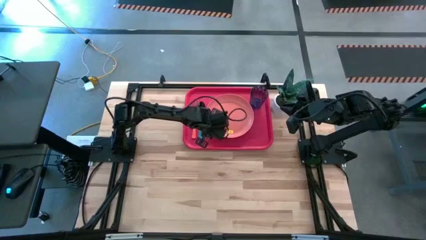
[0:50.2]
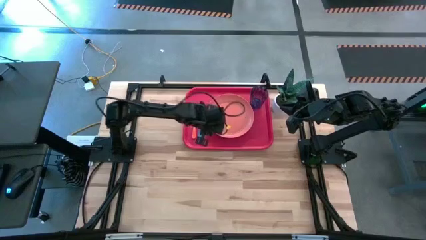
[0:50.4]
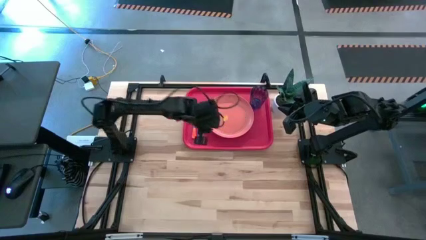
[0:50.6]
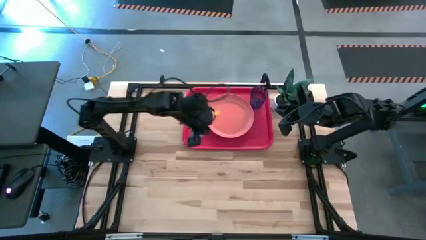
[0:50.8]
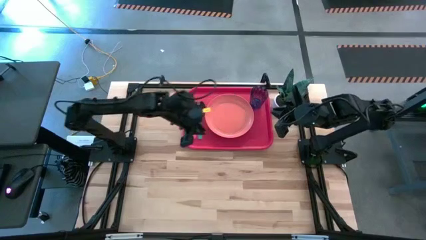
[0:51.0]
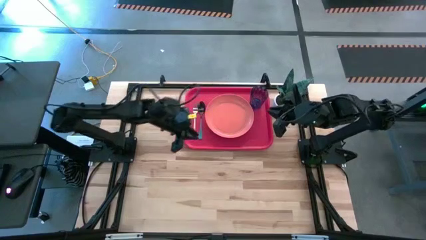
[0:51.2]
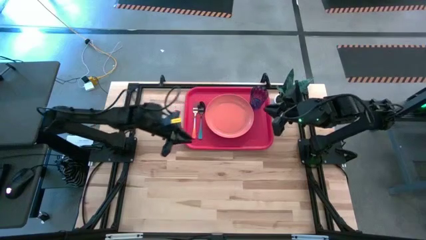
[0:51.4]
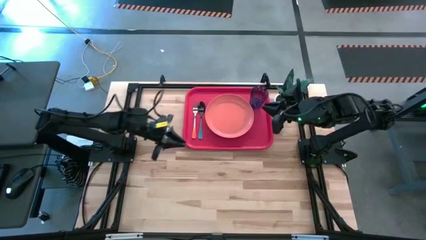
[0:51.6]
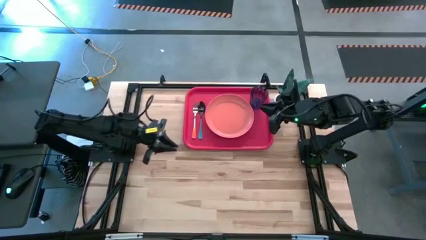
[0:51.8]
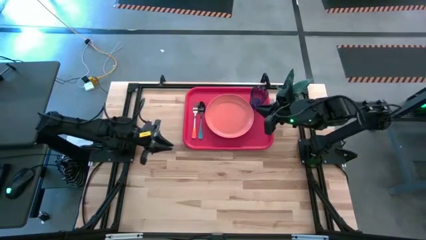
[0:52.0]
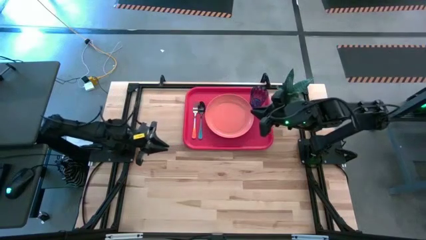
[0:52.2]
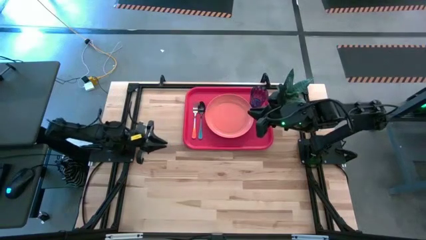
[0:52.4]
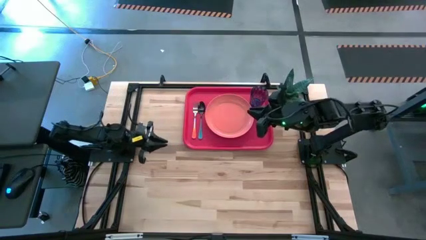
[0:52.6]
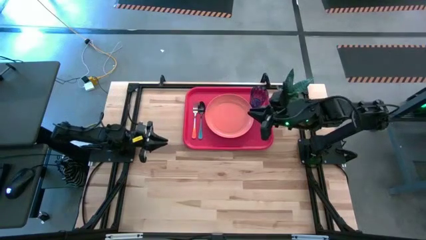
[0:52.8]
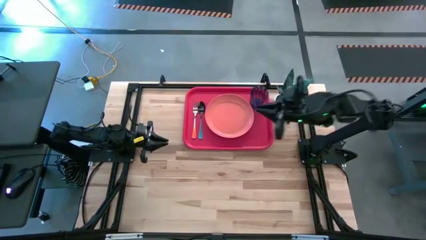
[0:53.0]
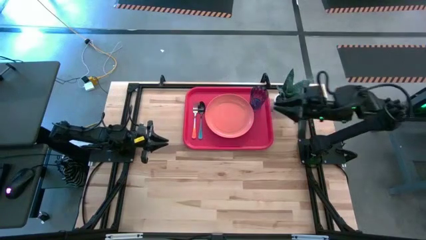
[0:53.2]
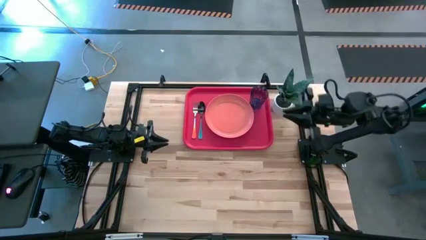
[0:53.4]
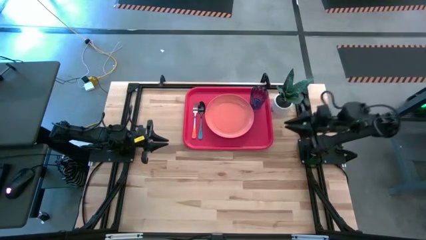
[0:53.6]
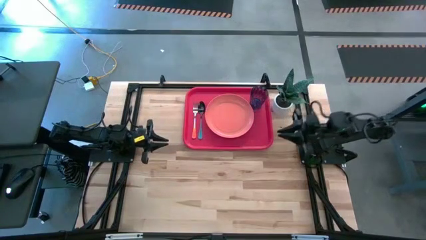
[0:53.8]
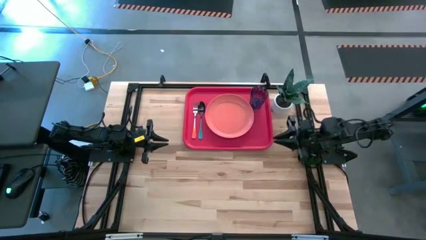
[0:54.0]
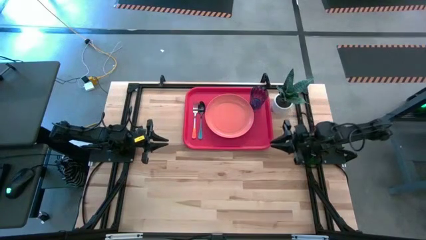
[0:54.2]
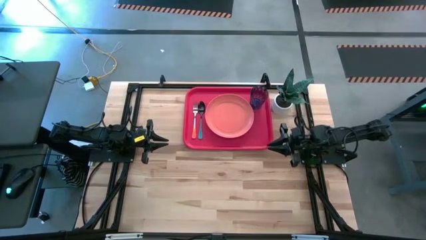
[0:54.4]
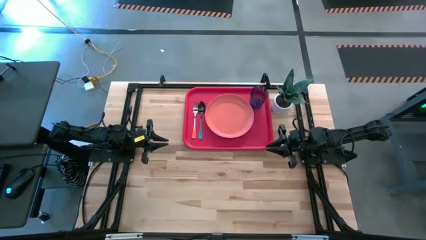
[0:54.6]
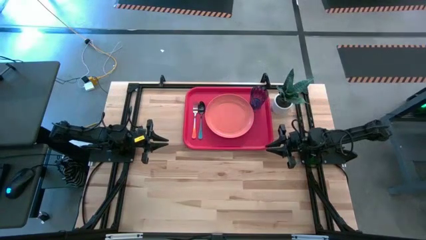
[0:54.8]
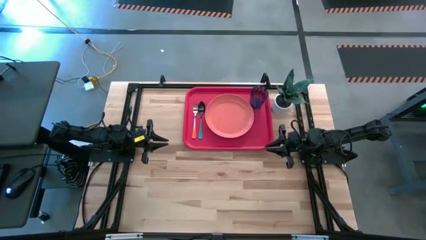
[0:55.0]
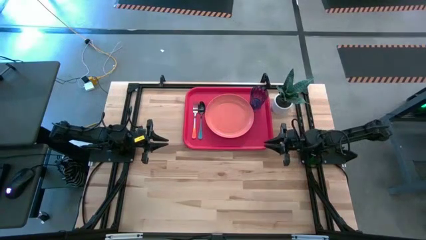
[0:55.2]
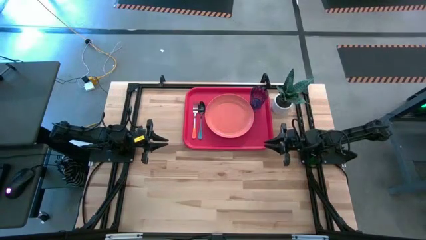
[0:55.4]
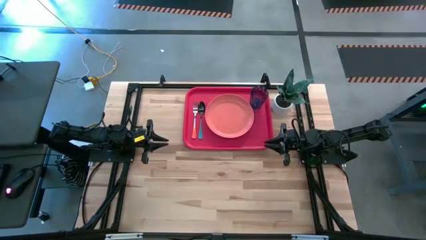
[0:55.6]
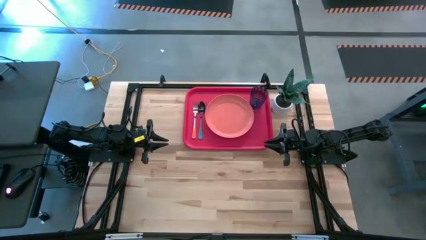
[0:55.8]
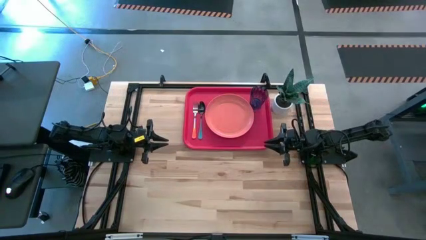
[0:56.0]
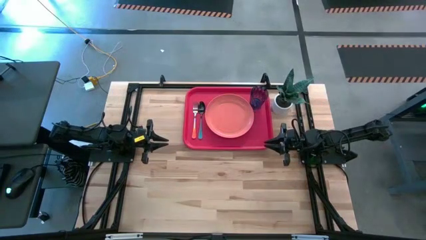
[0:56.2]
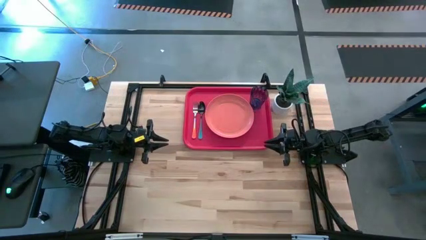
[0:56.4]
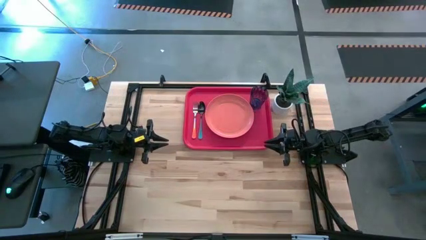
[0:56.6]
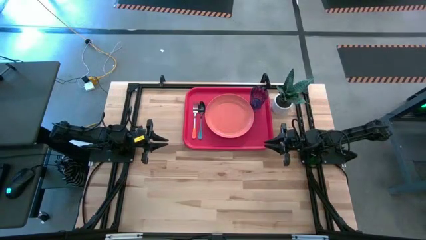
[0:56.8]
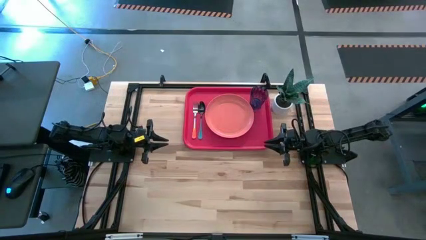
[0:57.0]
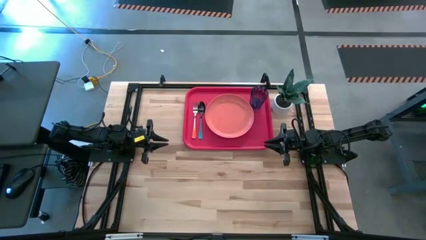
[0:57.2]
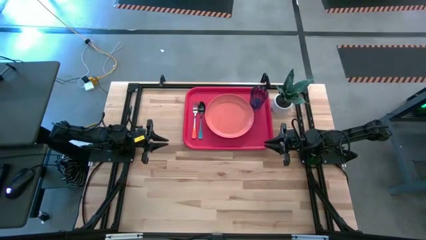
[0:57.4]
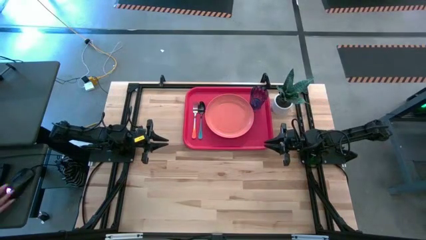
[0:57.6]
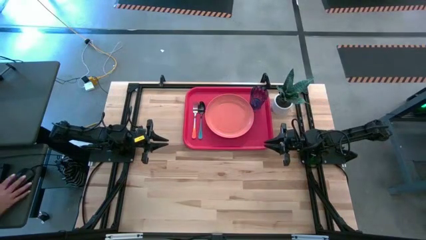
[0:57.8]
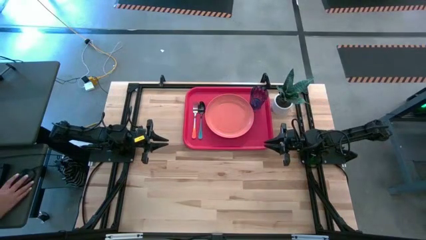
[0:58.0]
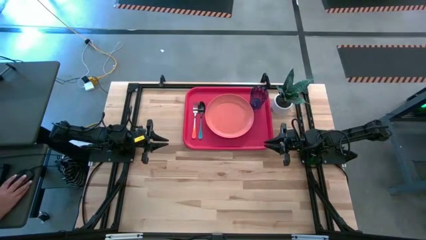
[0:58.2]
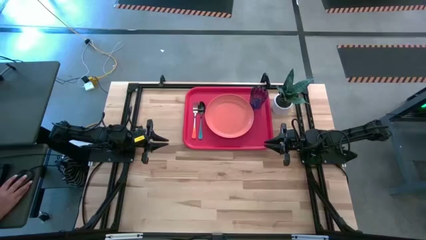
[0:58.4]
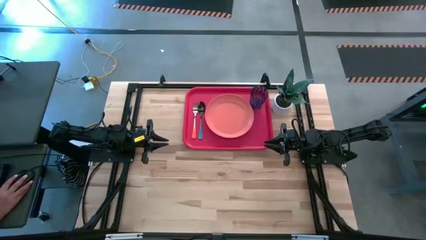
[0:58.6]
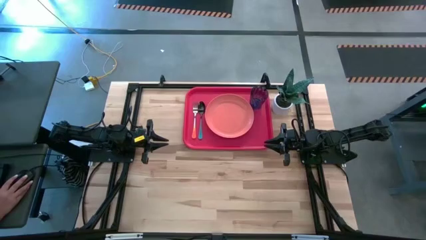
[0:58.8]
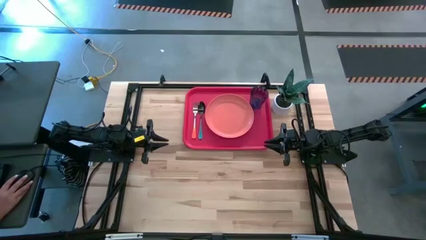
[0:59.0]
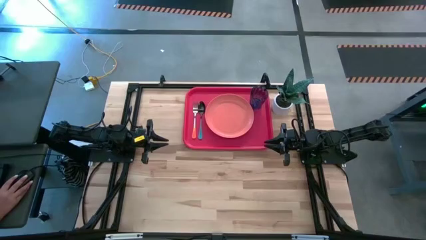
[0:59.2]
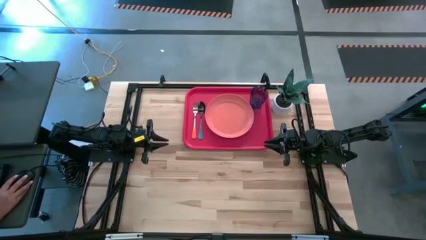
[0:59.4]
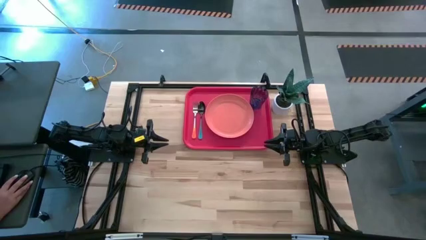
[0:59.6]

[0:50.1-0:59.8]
Task: Pick and place plate/cup/fork/spoon on tray
Return to Home Position

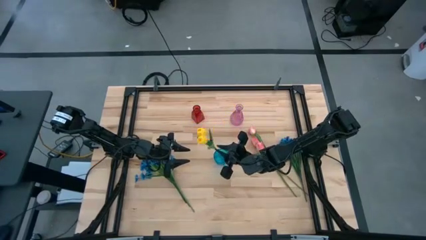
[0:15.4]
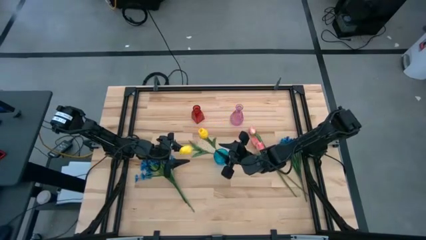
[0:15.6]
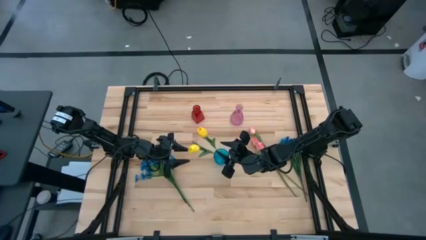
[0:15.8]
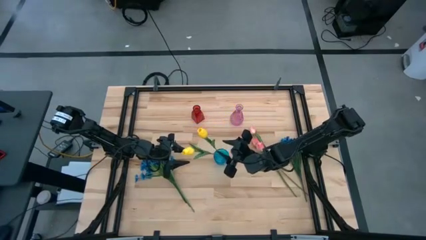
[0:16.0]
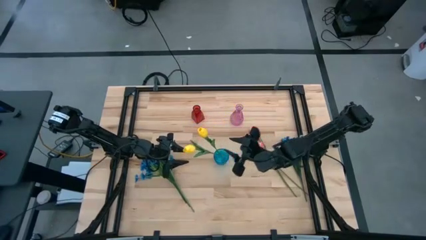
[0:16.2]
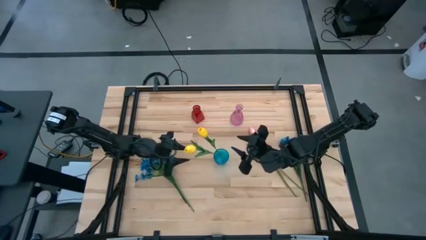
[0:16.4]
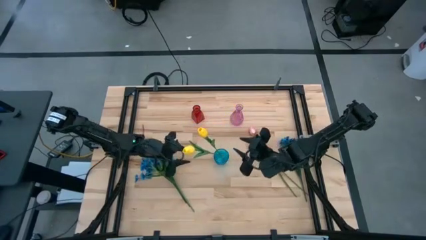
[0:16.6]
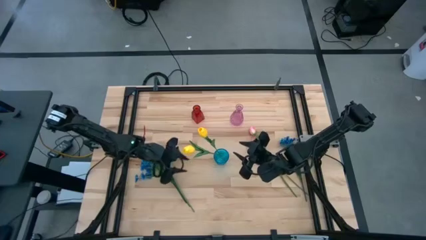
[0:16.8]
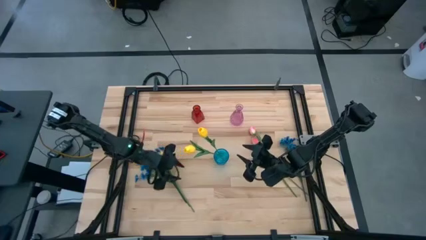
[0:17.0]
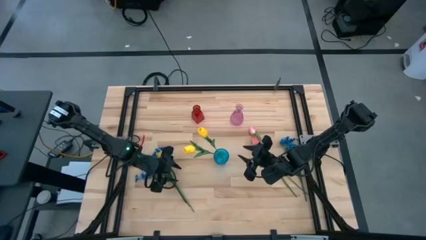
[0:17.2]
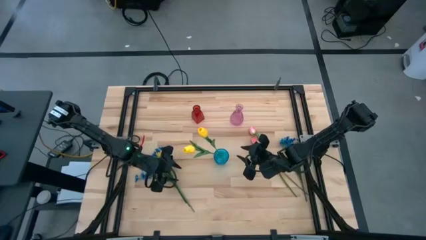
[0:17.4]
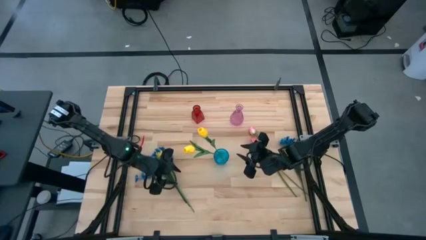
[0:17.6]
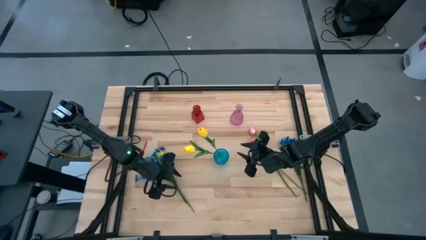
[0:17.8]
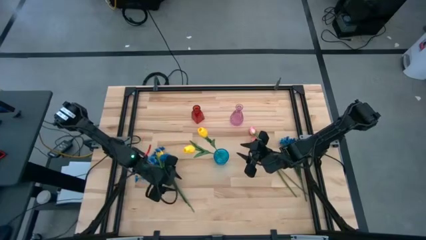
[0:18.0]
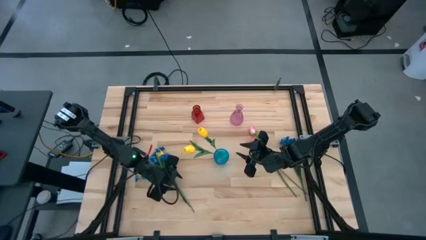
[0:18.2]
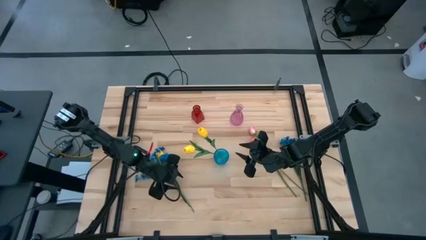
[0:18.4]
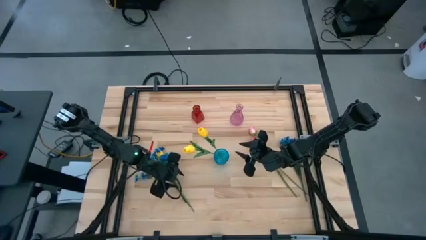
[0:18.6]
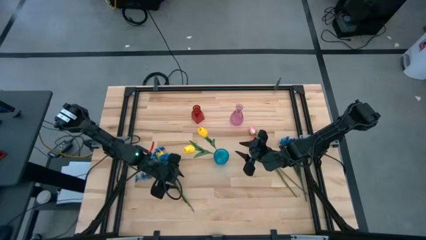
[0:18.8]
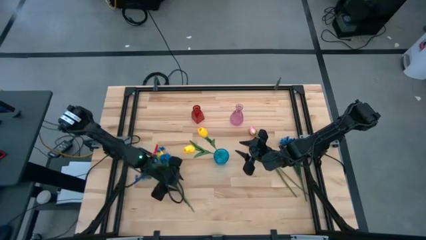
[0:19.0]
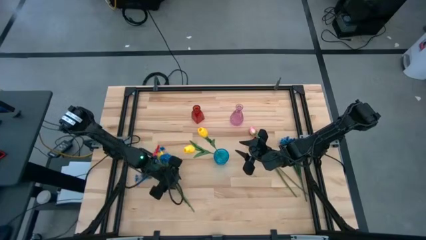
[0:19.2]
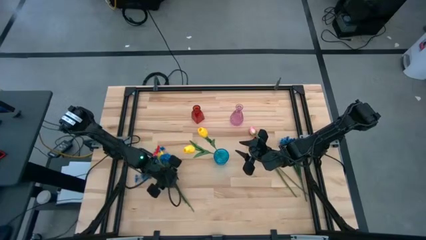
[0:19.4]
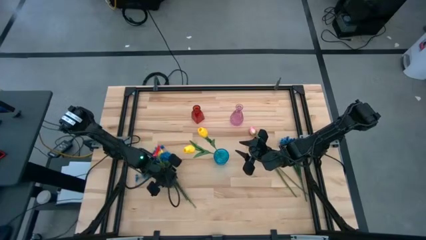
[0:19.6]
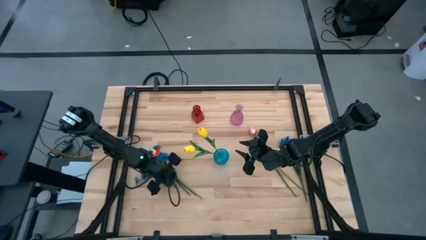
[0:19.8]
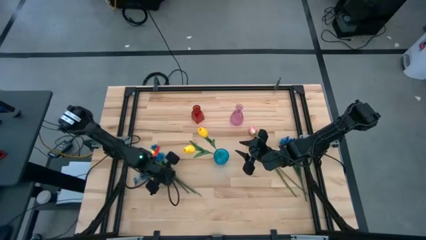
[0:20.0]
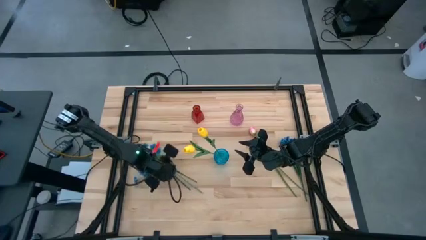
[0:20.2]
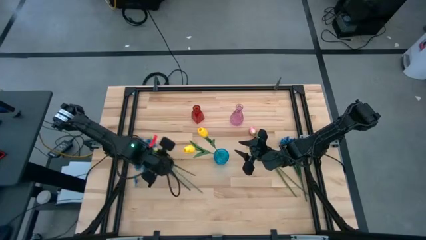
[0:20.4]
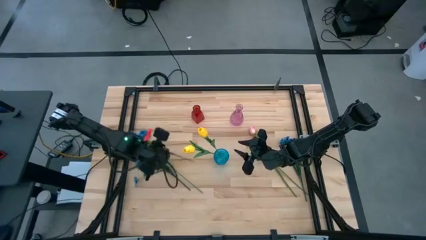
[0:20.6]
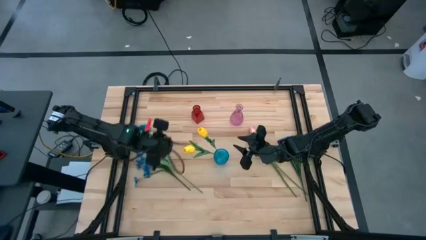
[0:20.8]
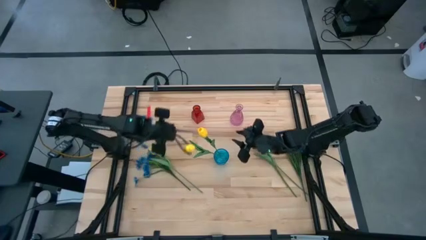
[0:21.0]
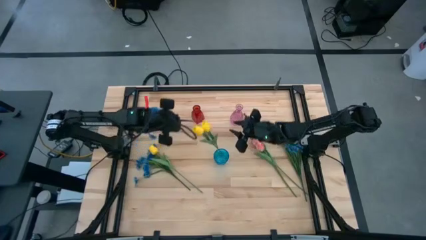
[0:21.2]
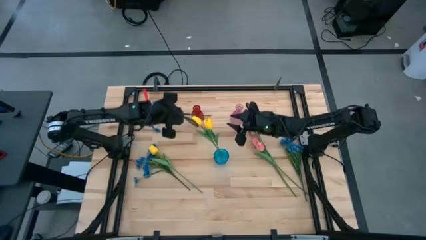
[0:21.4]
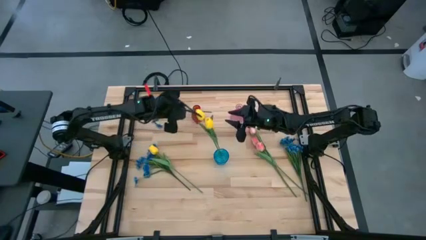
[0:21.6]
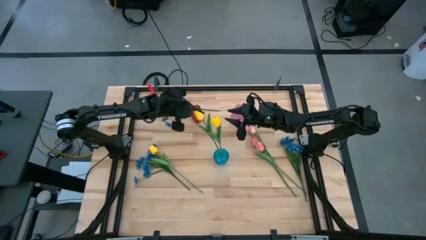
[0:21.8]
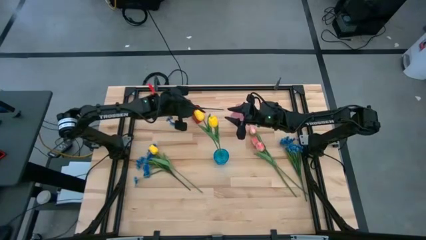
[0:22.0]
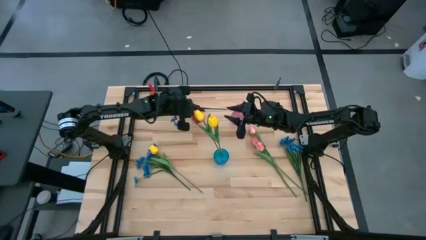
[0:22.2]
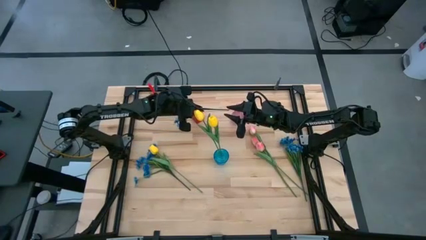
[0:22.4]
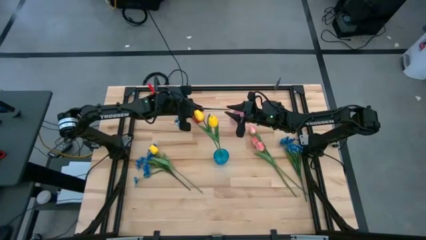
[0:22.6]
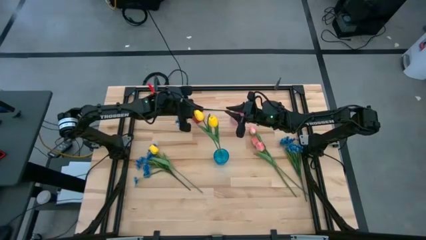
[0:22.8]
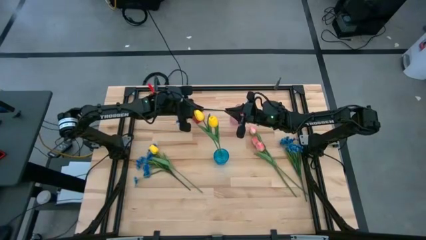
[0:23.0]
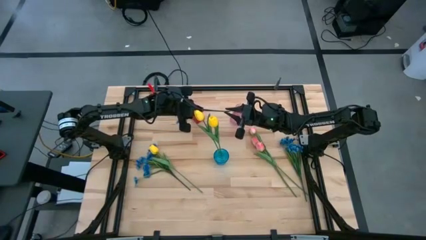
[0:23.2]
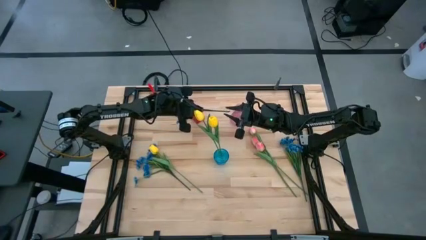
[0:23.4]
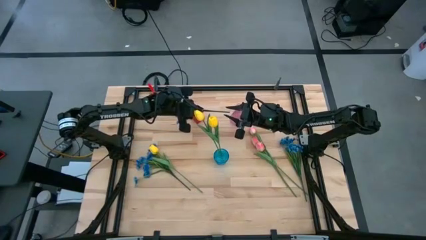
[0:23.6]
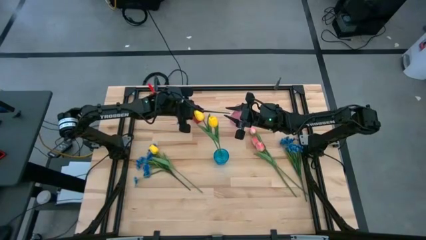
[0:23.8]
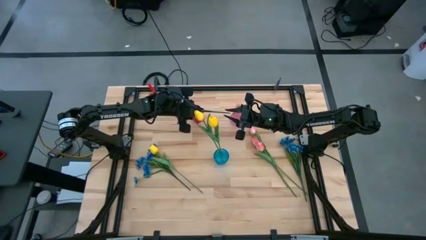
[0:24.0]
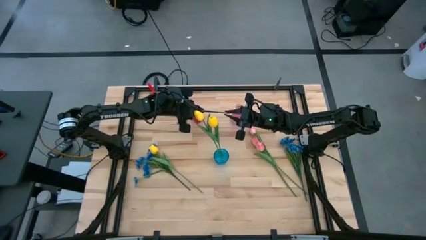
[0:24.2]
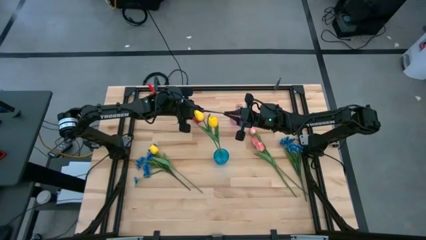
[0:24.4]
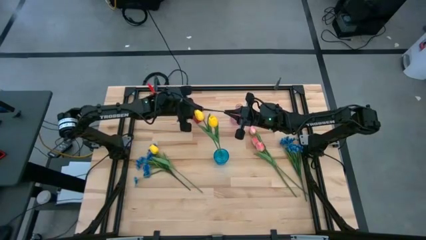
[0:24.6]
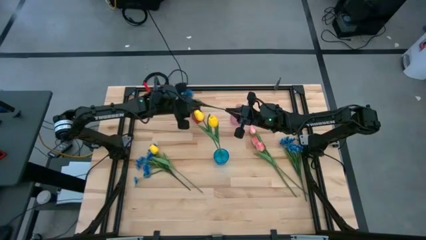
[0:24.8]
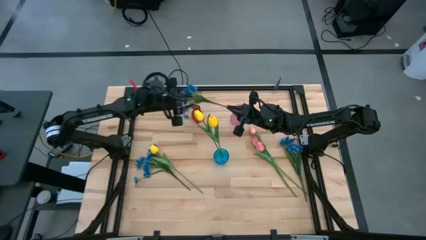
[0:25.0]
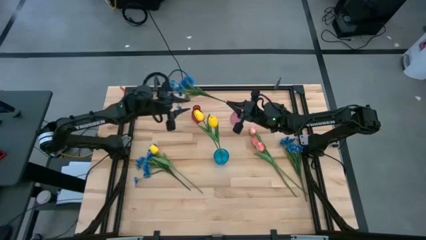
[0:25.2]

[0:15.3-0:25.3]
Task: Sort flowers into vase by color
Put the middle right blue flowers into the pink vase
